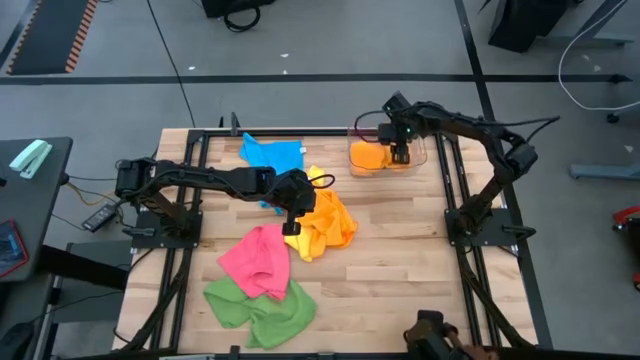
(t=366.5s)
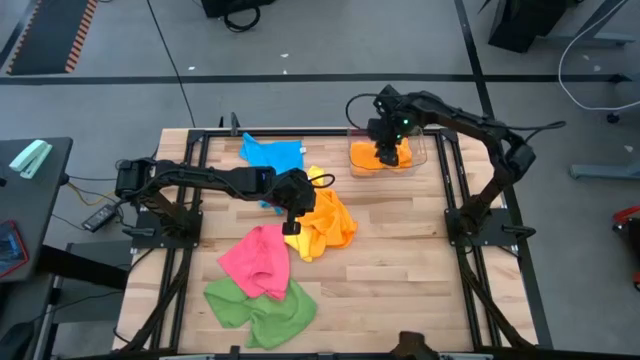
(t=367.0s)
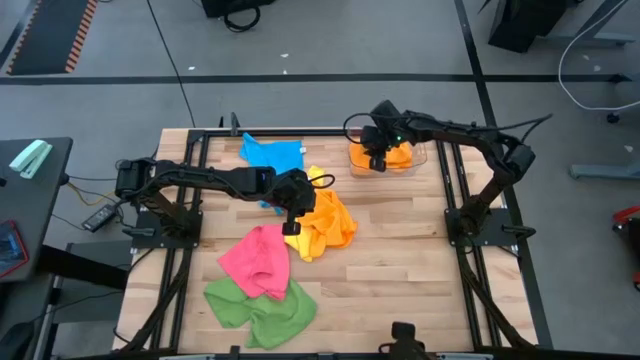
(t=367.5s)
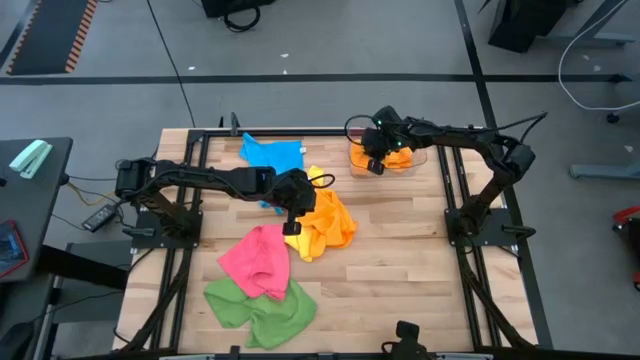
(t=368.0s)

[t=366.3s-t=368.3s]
Task: Fold microfiber towels
Adjust the folded orange microfiber cloth in the transparent bin

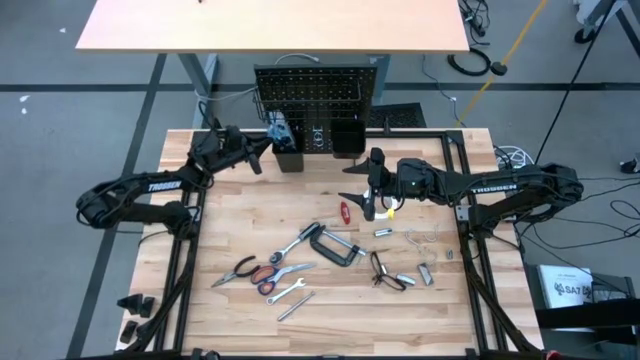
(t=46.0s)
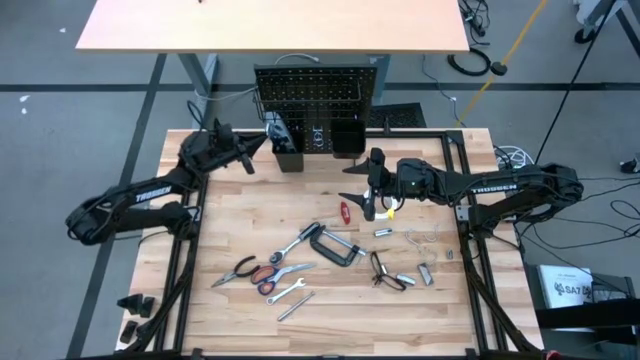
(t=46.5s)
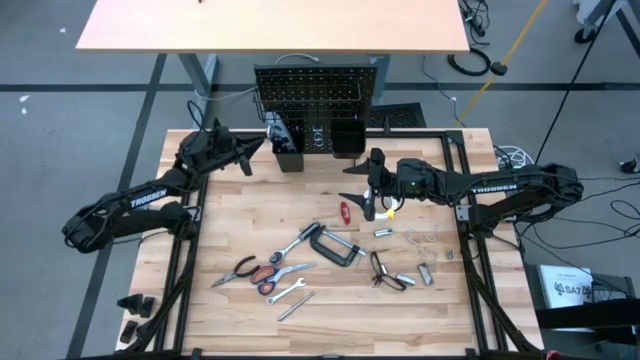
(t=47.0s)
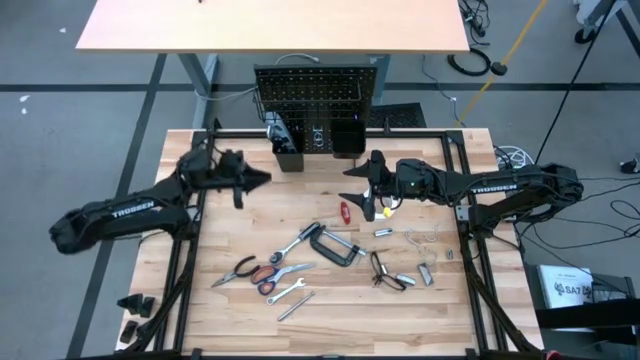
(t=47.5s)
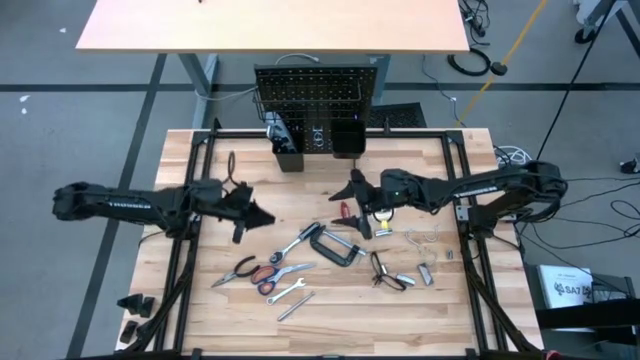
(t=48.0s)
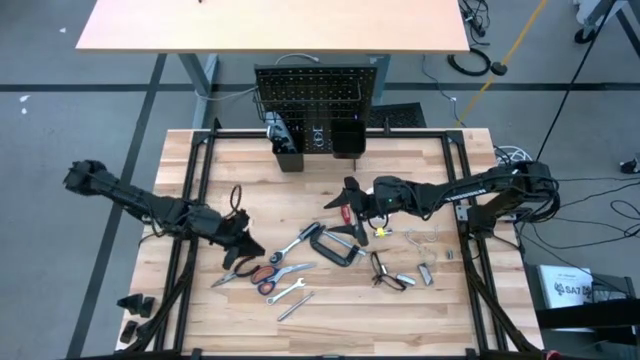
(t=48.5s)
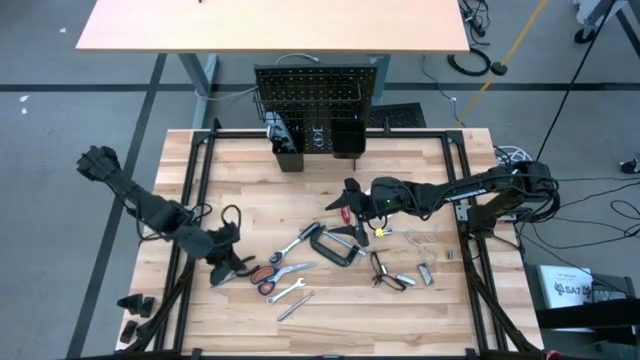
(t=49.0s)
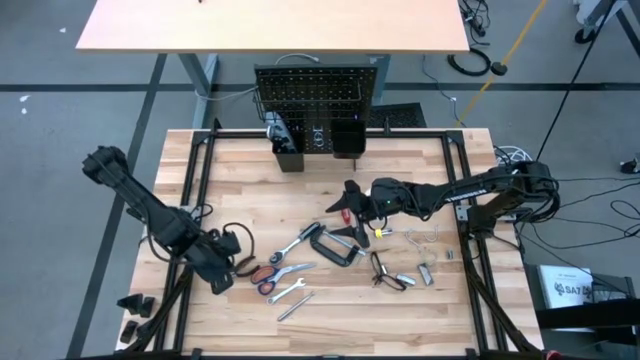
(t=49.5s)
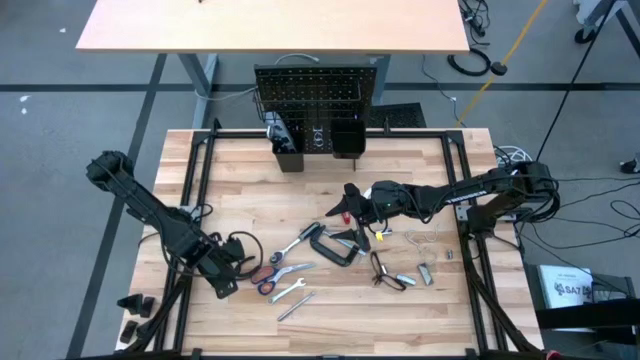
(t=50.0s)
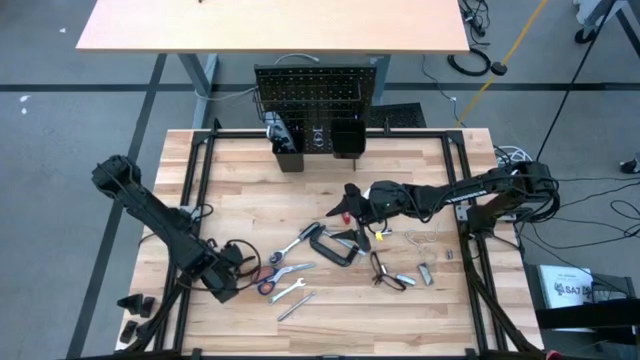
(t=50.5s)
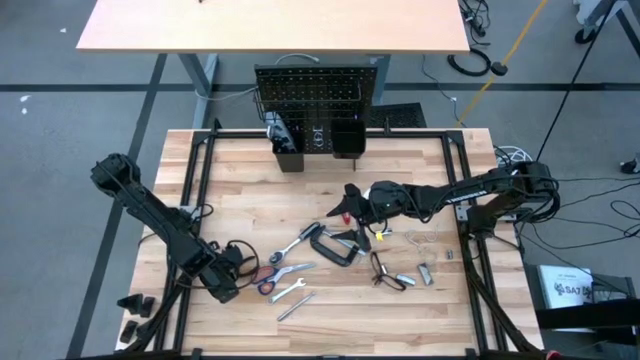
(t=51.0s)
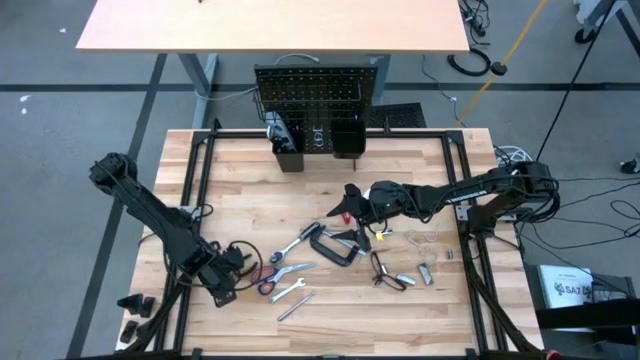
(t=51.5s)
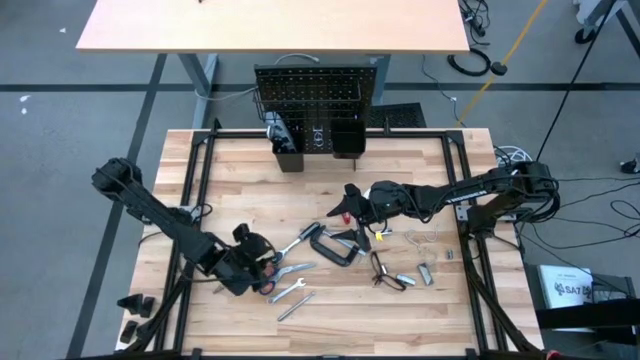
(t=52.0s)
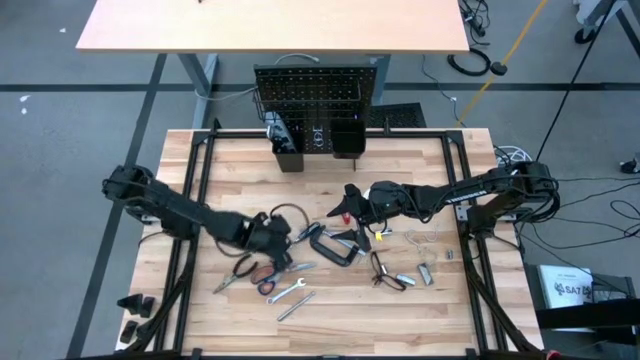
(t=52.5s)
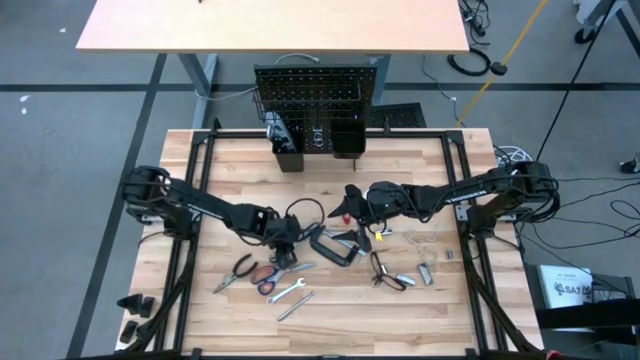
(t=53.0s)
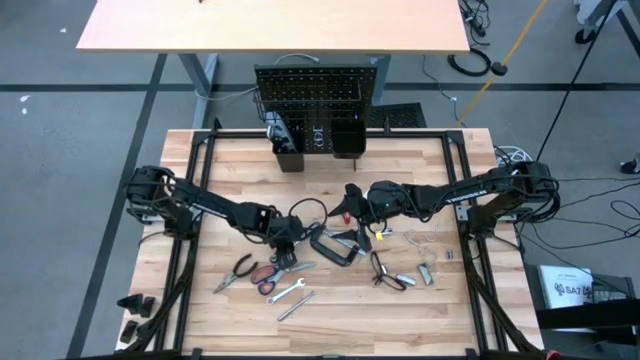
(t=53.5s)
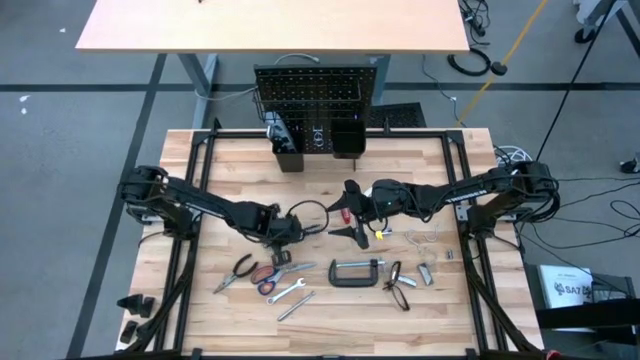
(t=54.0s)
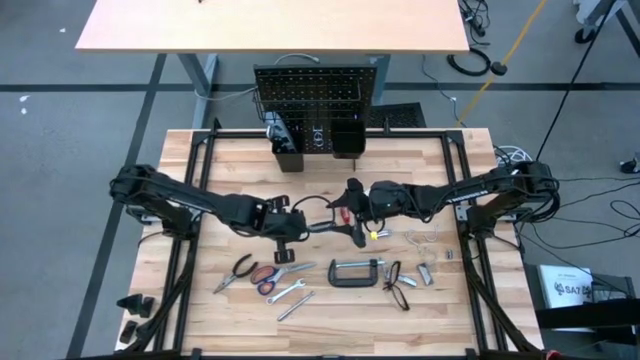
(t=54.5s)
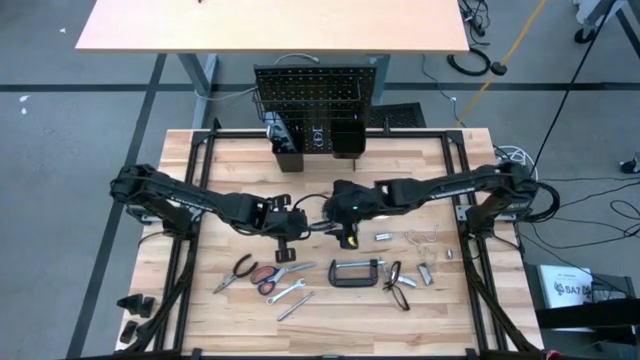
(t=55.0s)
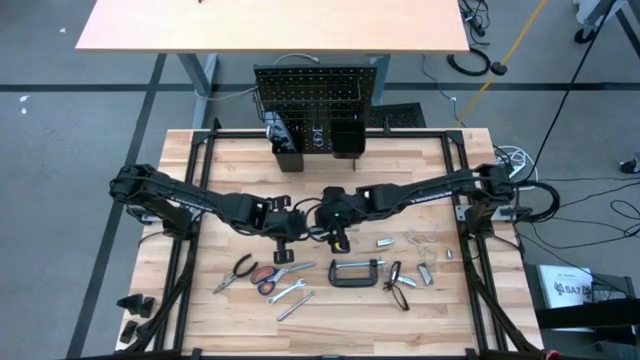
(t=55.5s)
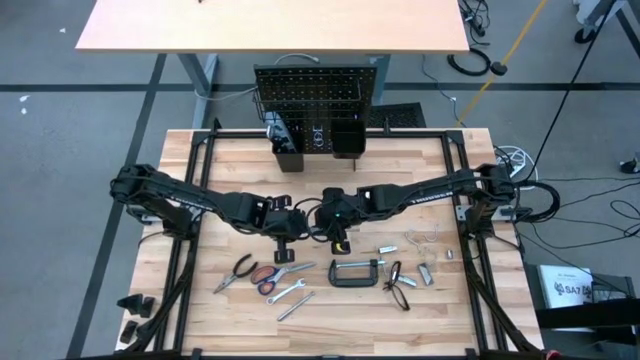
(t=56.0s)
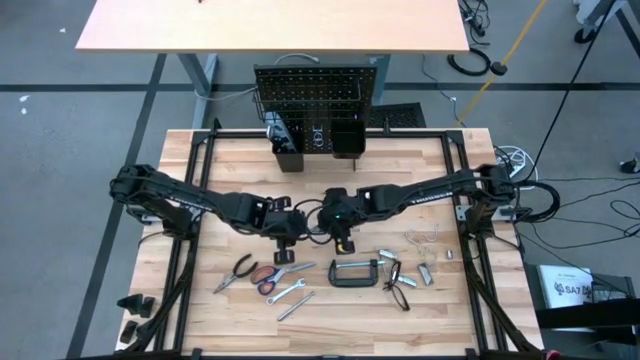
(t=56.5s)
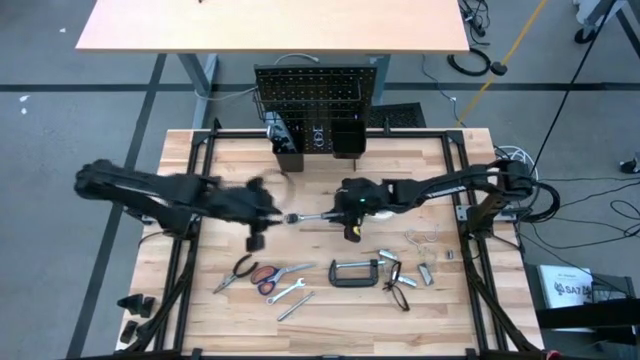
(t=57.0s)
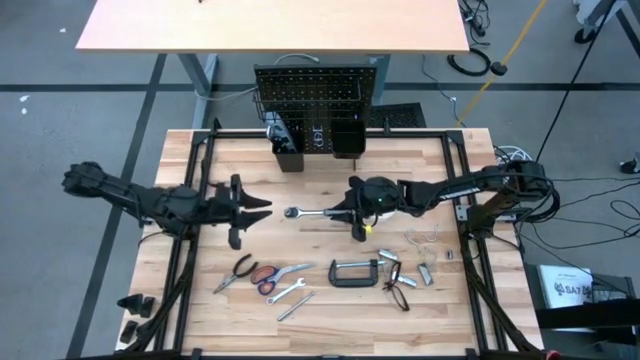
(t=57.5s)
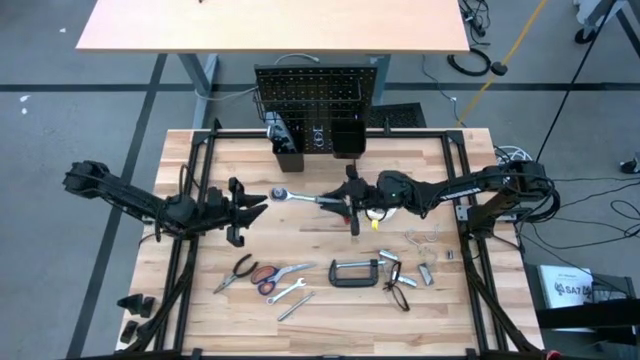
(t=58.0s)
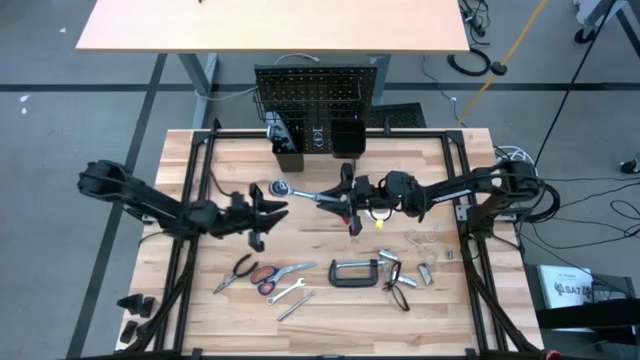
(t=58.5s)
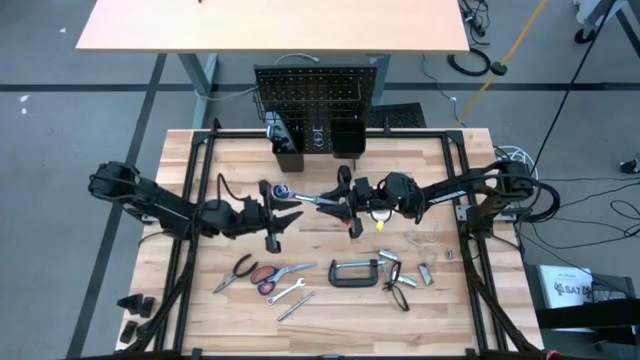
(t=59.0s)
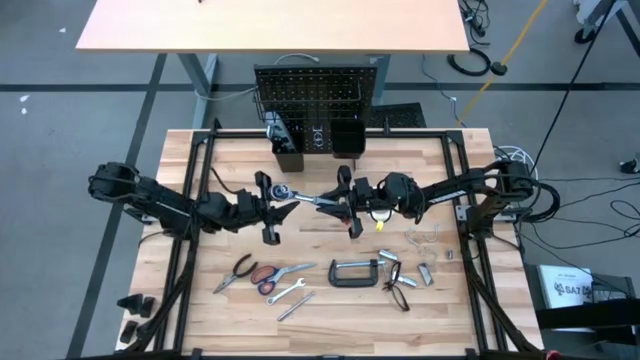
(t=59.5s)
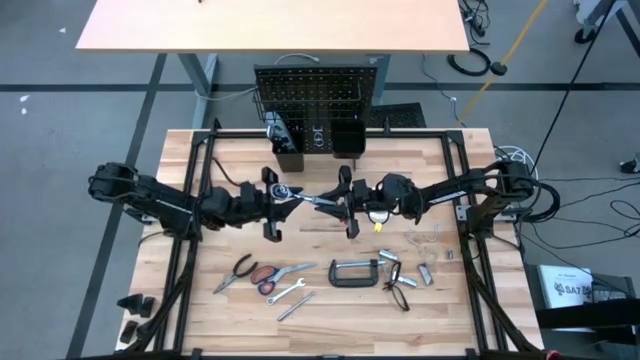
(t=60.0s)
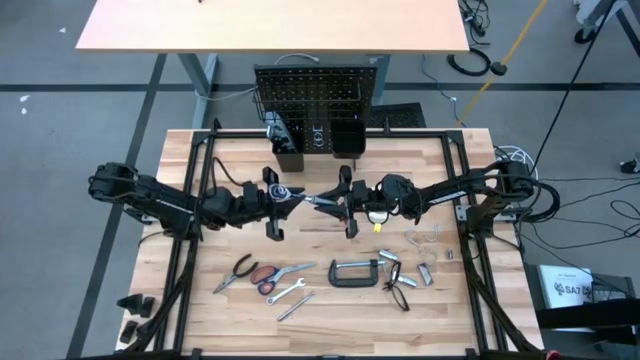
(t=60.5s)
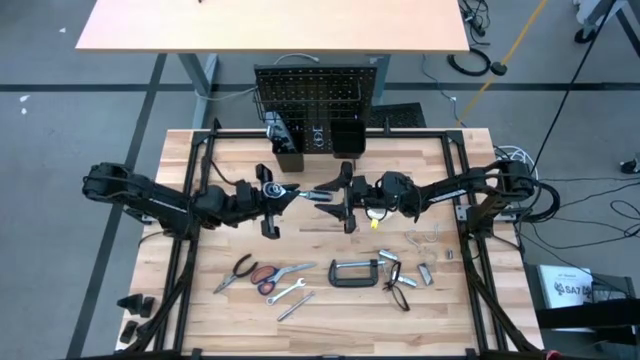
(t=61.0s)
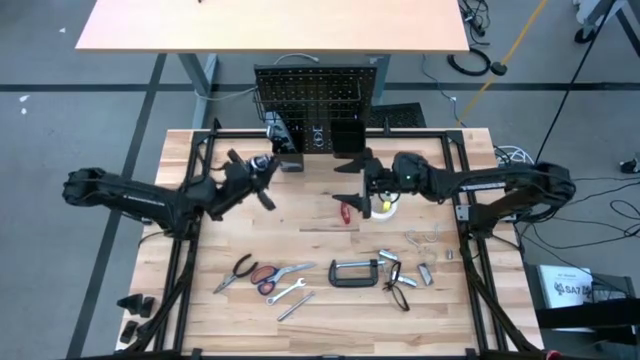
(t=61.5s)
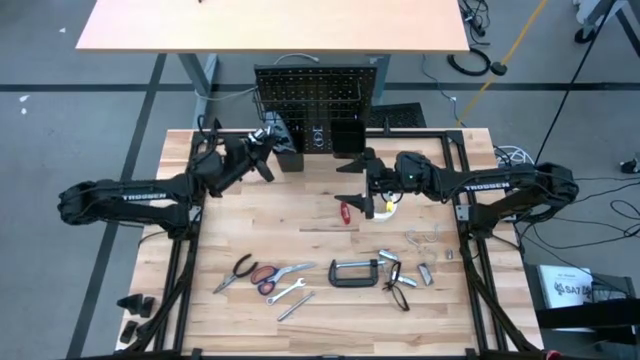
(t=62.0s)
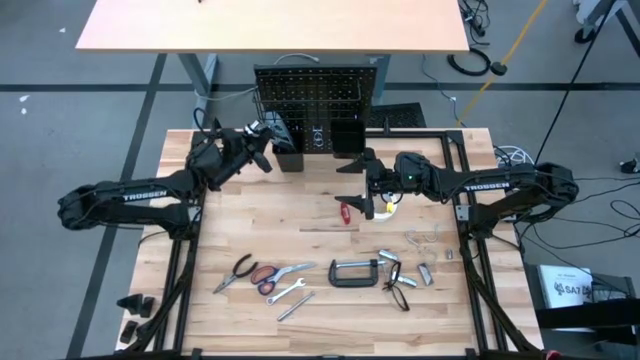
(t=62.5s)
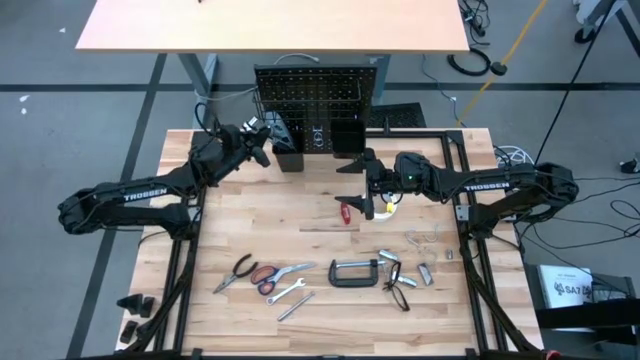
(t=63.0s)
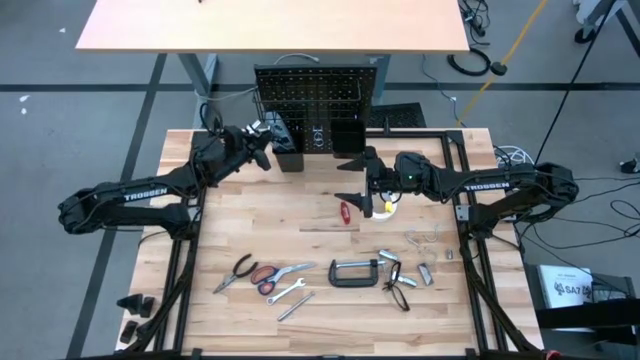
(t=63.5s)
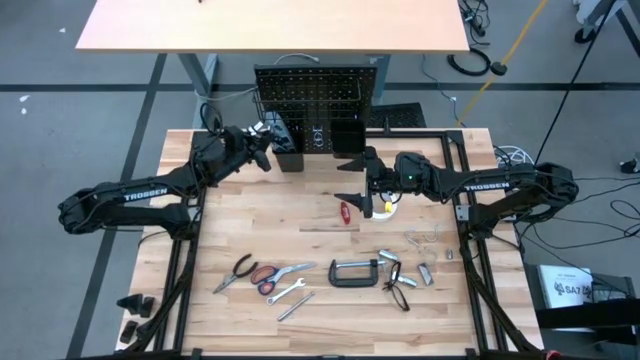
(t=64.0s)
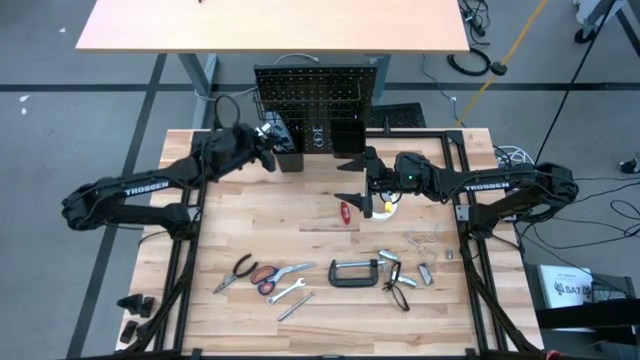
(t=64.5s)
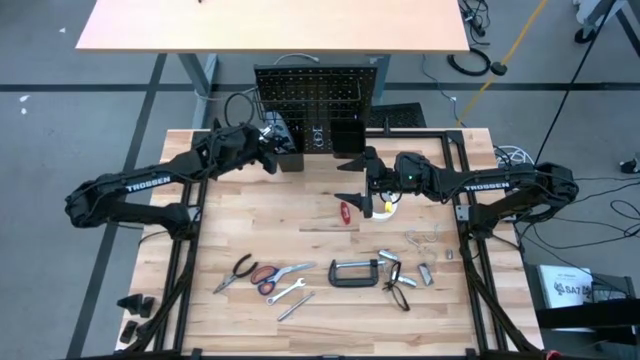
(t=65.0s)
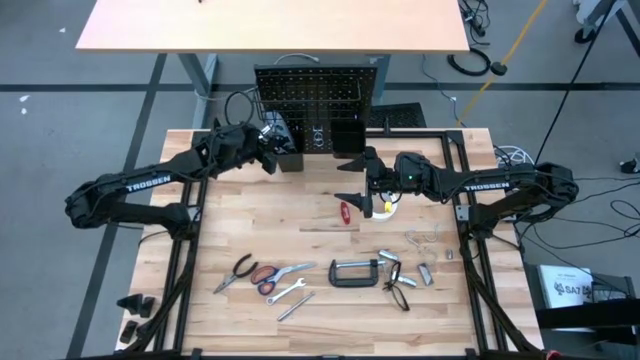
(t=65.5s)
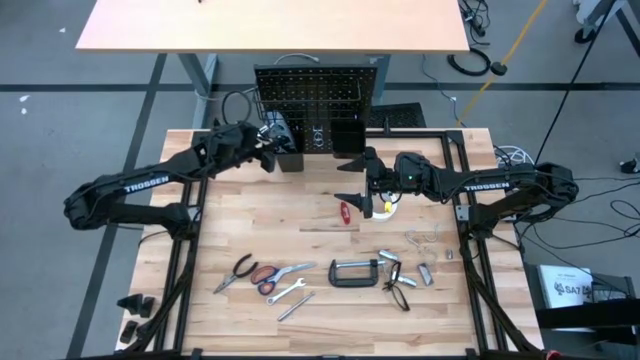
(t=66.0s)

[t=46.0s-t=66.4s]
Task: Hang tools onto peg board
Put the ratchet wrench on the left lower deck of the pegboard
